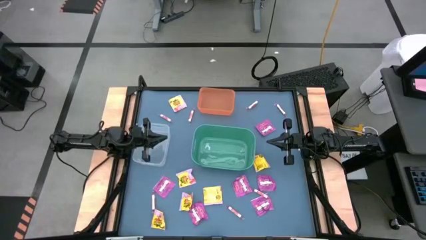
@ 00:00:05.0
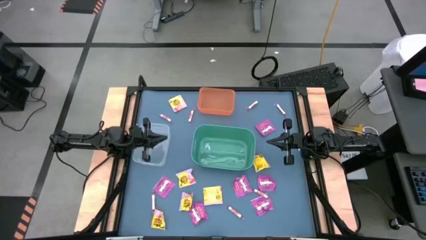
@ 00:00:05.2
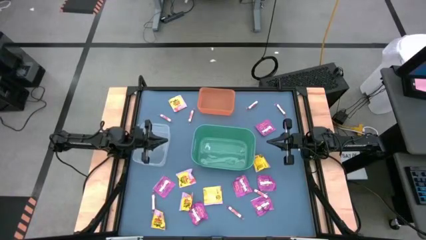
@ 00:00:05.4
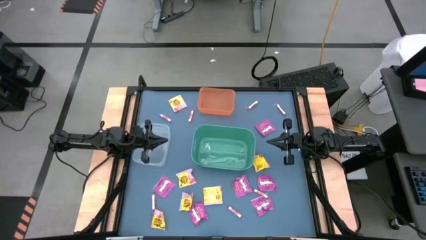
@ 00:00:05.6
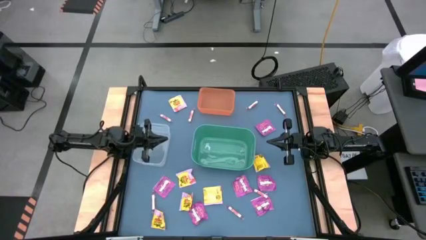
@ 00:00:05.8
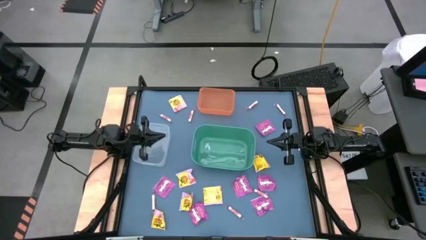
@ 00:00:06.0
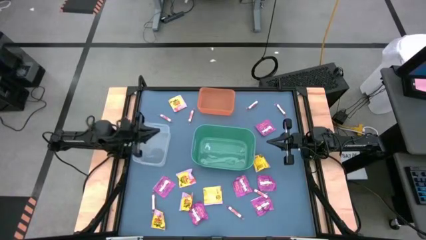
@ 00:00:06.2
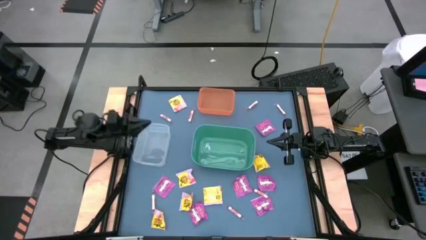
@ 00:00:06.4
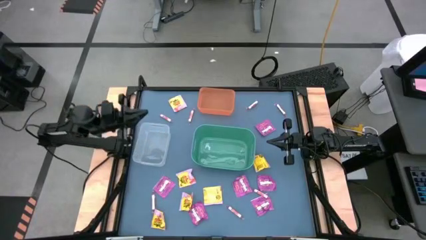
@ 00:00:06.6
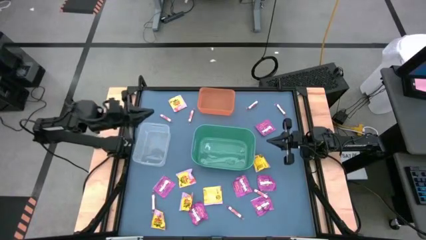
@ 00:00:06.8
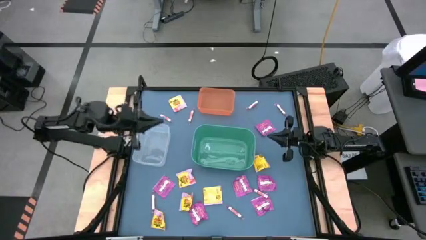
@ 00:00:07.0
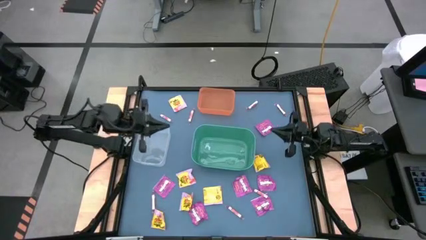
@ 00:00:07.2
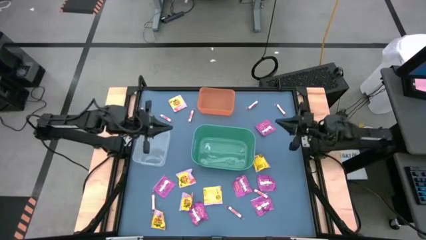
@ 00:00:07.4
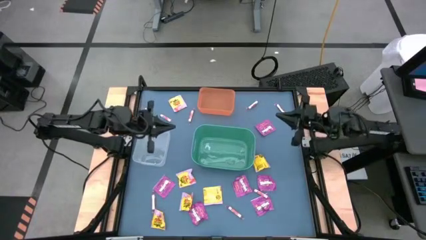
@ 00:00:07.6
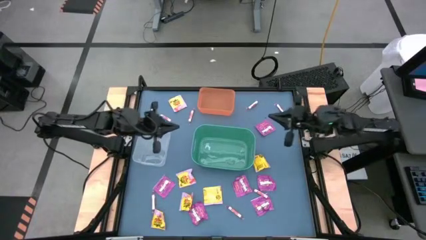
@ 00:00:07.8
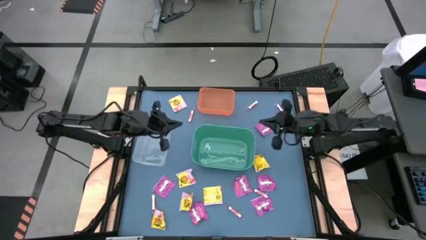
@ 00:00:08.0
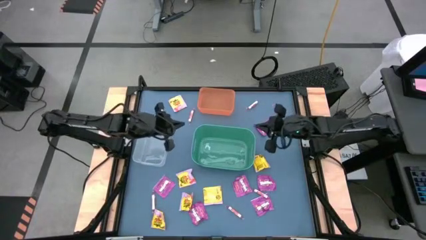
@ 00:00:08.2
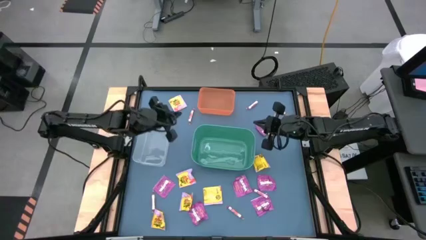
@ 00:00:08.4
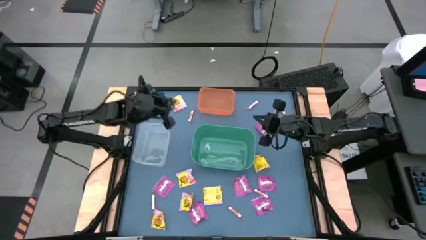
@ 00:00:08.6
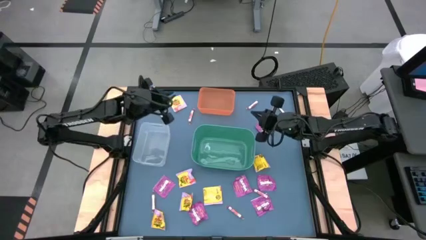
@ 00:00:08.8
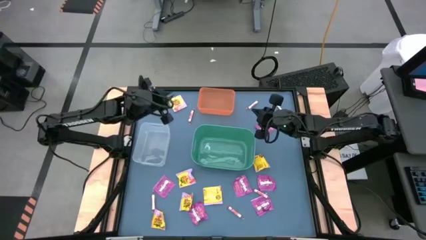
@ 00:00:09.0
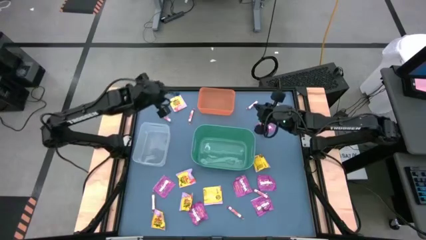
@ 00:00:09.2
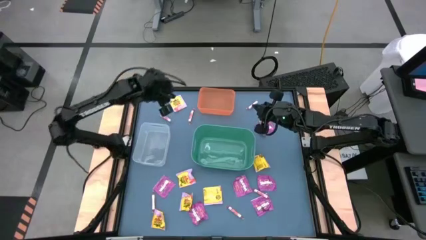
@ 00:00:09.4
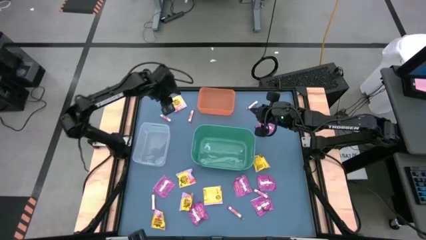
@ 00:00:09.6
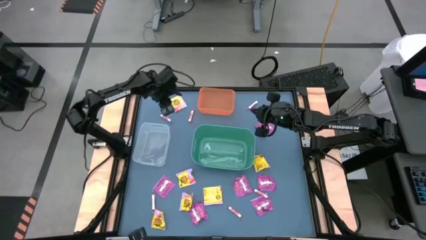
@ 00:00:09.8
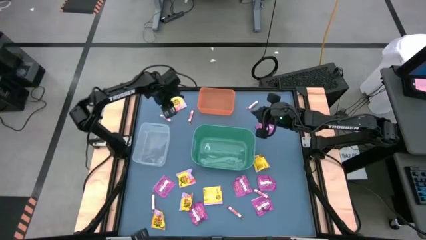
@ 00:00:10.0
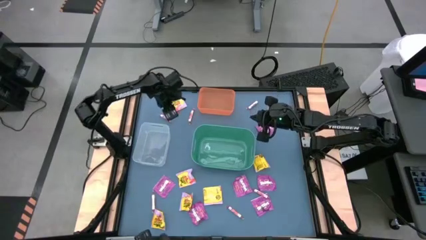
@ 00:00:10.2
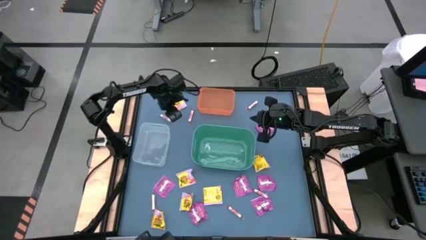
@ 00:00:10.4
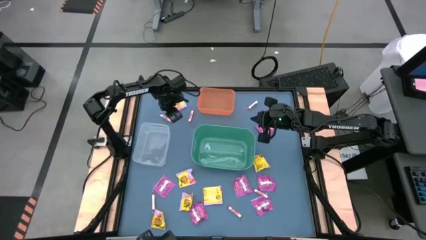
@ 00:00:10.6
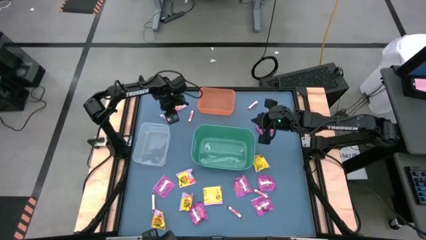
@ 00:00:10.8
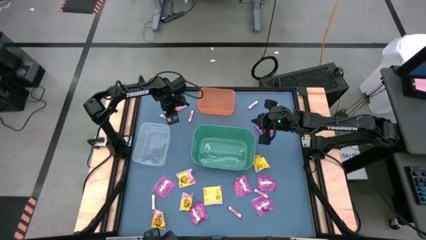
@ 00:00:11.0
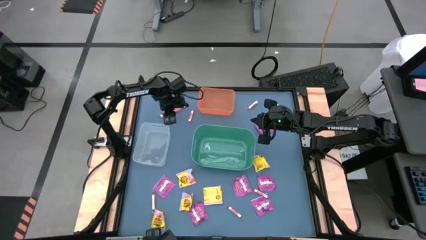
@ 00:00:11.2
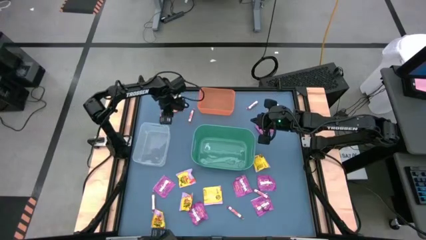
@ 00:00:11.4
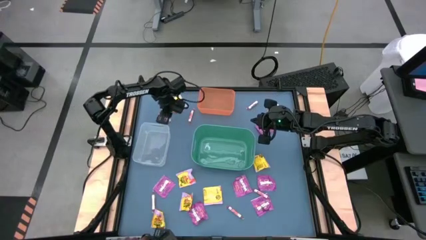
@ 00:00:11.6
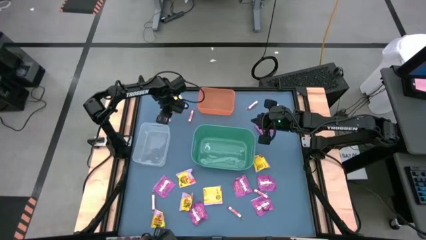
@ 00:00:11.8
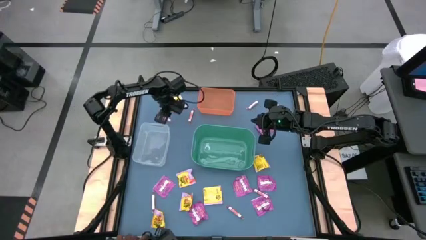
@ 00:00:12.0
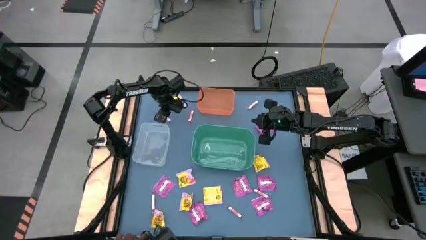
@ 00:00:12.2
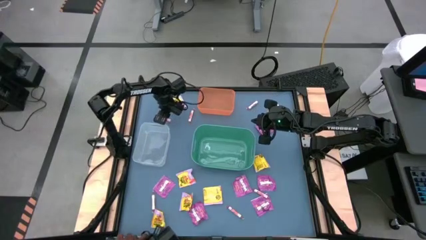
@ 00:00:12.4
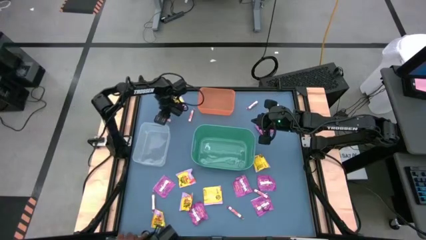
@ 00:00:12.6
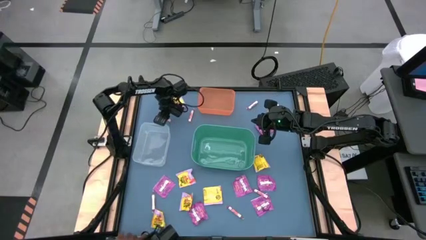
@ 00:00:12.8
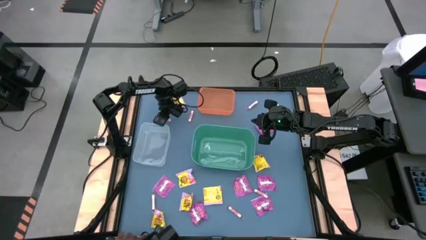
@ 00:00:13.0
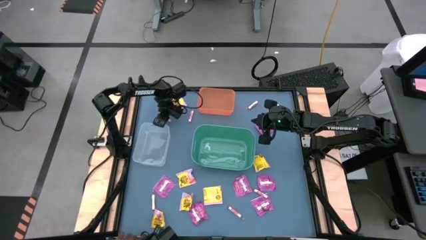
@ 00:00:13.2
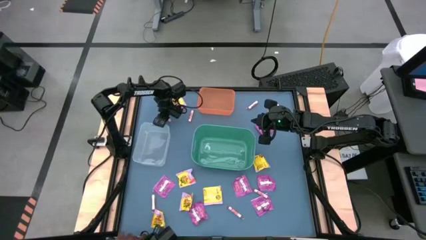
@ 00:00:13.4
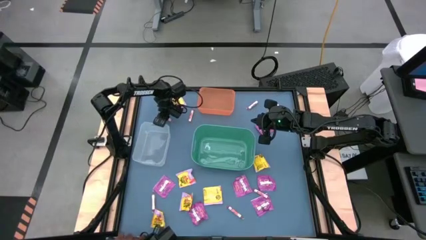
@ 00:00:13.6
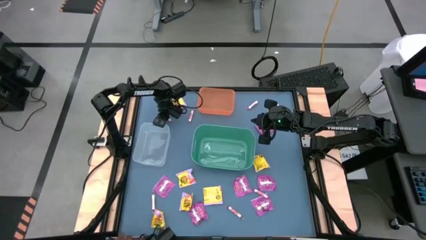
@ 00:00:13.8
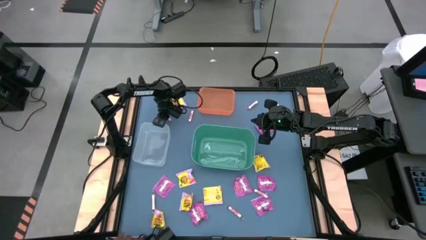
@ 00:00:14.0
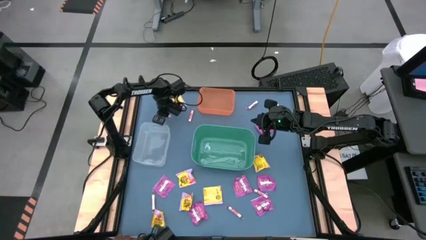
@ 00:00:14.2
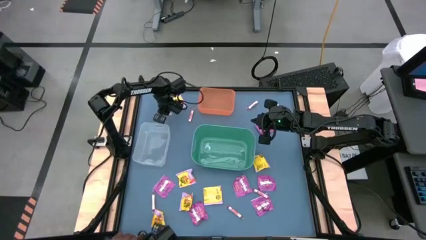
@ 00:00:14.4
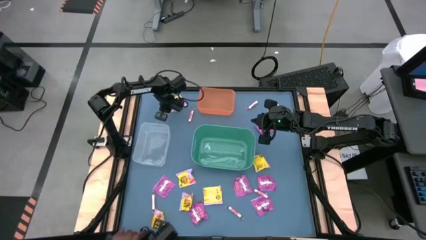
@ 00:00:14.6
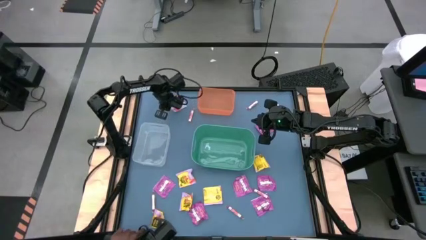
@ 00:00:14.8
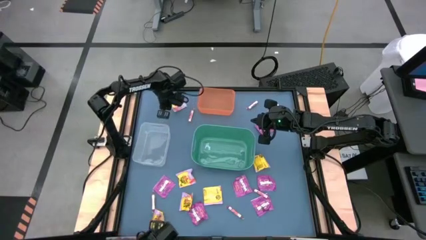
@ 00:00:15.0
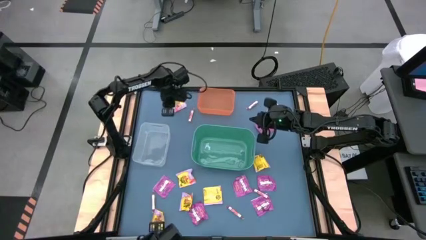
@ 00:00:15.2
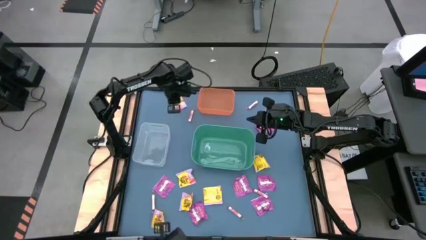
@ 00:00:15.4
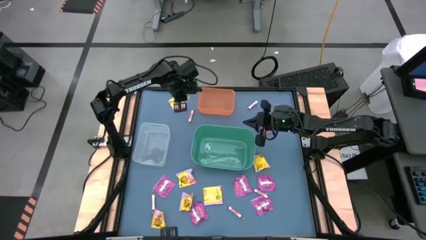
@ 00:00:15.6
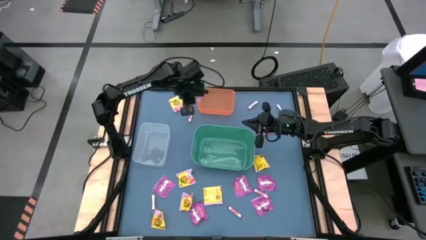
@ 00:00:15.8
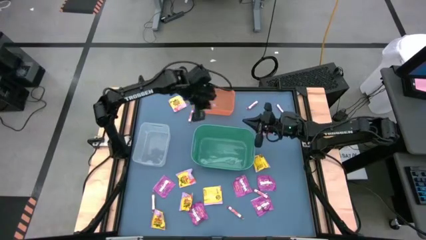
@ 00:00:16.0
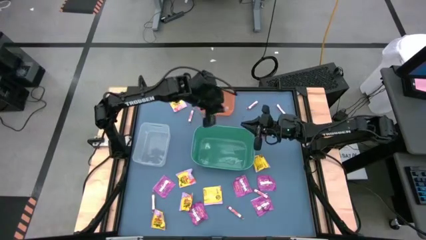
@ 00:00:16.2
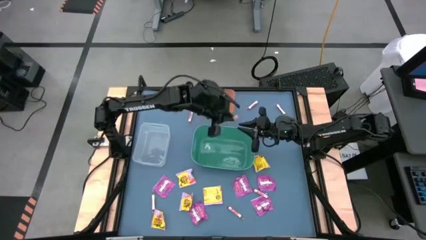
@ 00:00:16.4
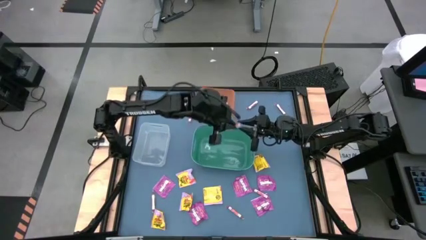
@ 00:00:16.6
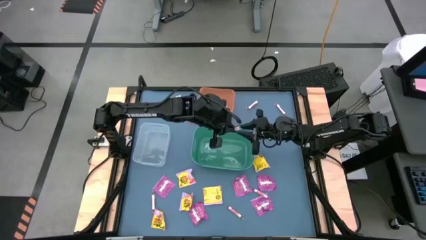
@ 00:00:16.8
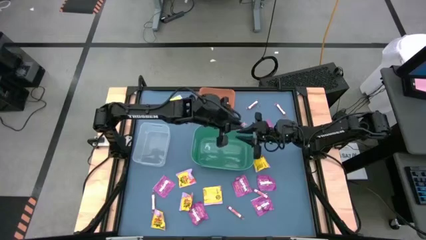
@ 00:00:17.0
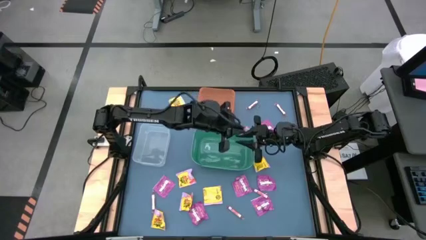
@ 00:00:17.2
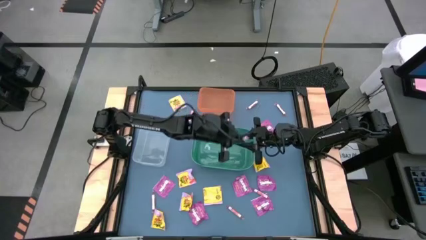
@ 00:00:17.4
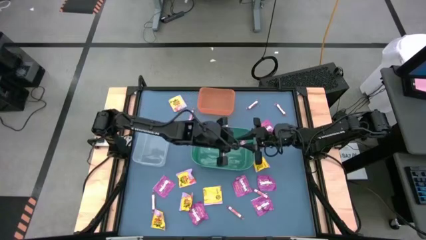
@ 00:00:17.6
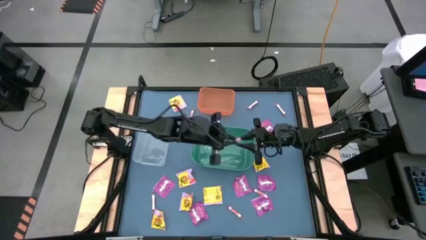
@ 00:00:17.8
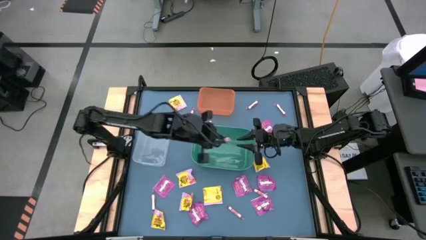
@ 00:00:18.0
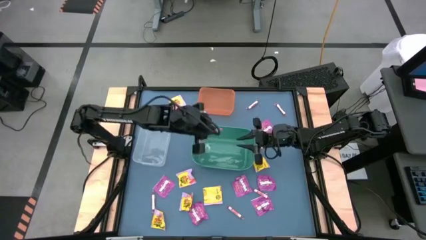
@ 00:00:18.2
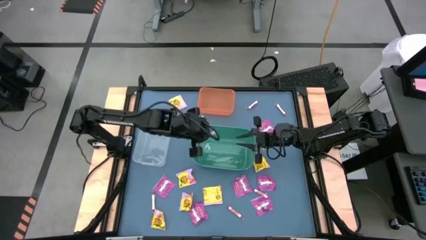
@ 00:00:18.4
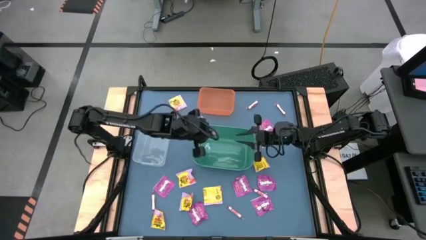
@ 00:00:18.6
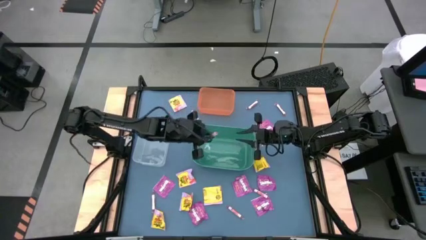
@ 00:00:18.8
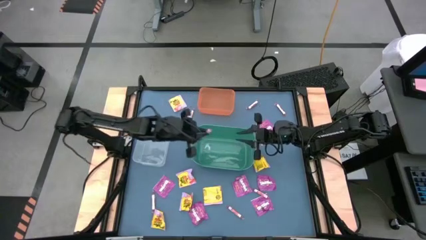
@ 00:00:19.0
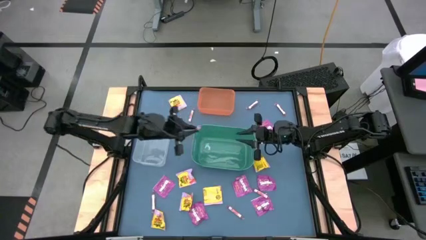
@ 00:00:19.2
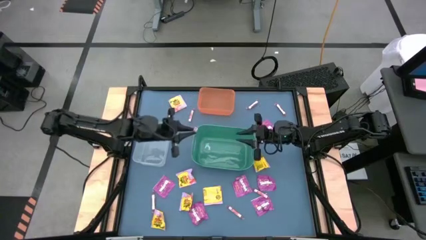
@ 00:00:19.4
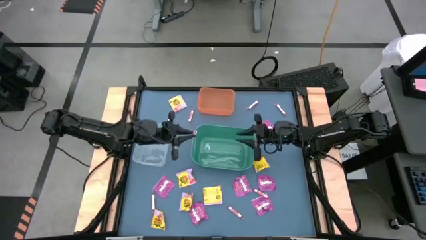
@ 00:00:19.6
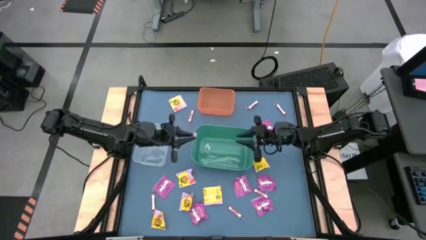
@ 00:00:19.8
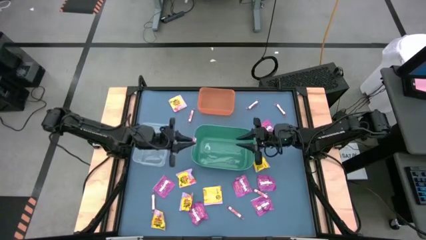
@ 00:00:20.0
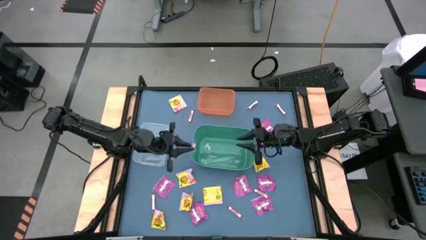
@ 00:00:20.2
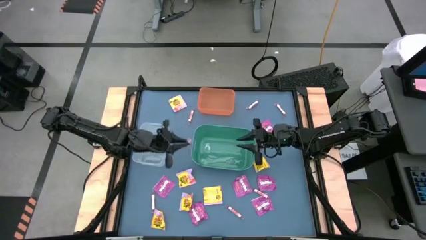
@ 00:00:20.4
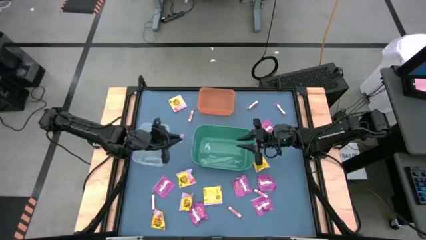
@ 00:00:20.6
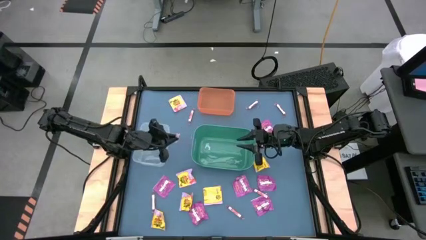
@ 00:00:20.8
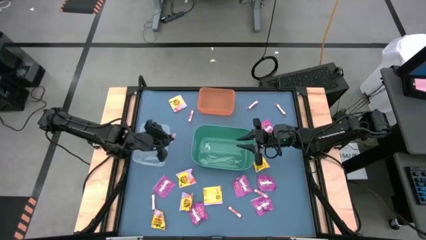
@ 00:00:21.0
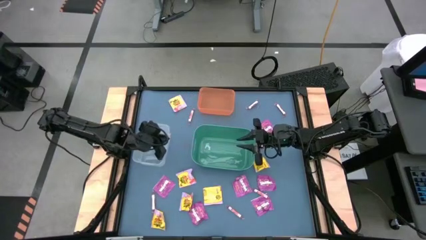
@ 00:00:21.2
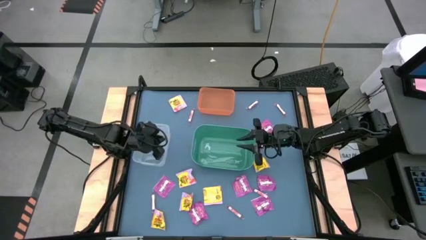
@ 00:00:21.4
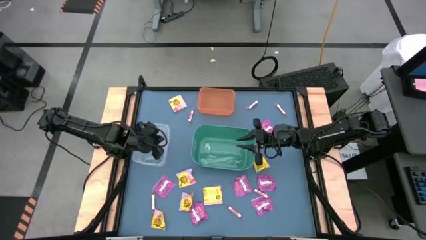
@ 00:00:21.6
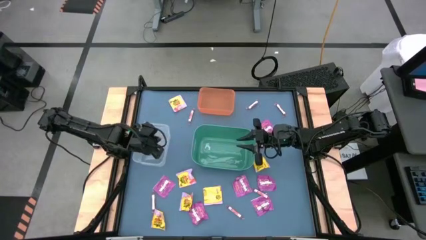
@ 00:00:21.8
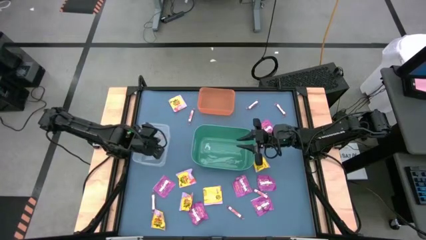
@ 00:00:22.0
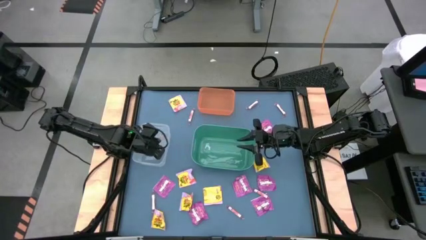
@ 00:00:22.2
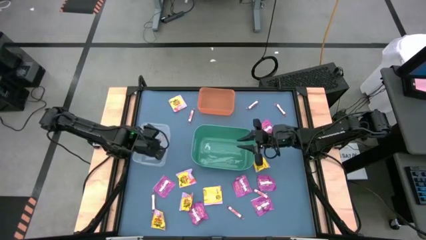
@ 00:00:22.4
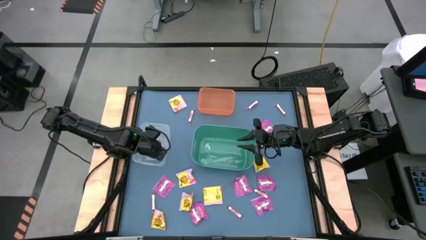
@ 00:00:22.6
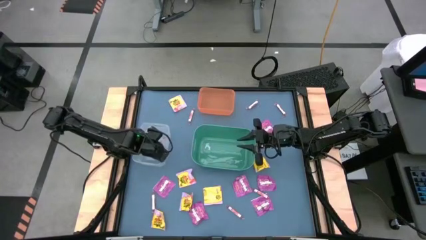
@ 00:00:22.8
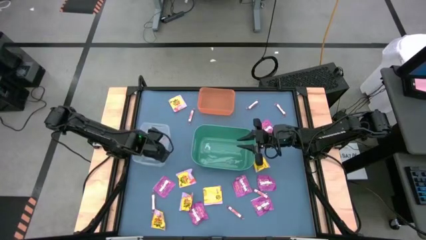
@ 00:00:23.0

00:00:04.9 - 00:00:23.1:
Task: Sort candy
Put the orange candy into the transparent bin
